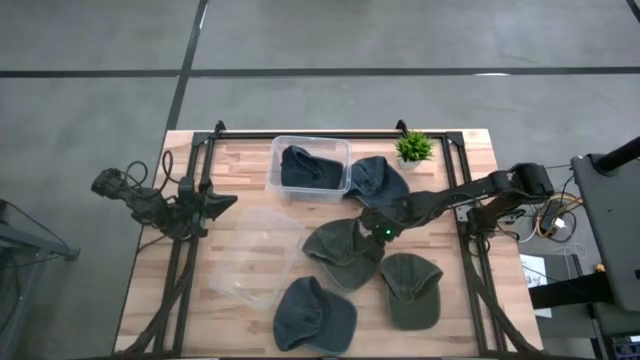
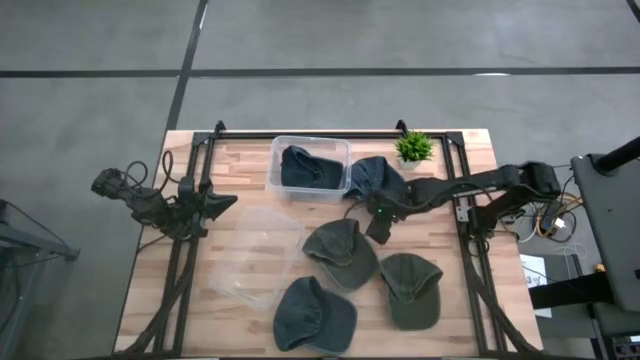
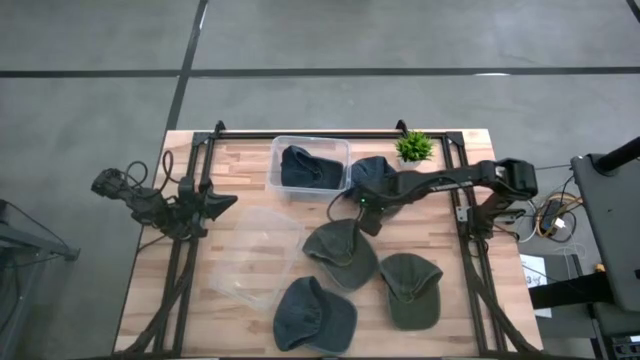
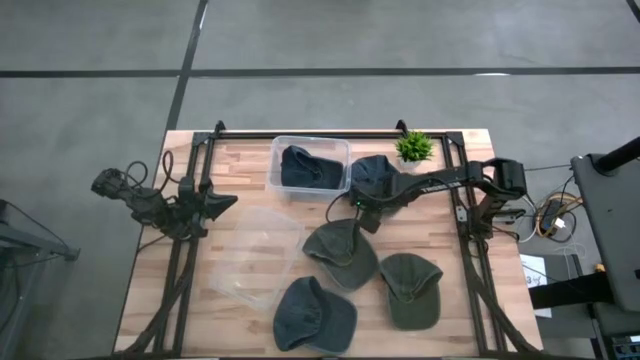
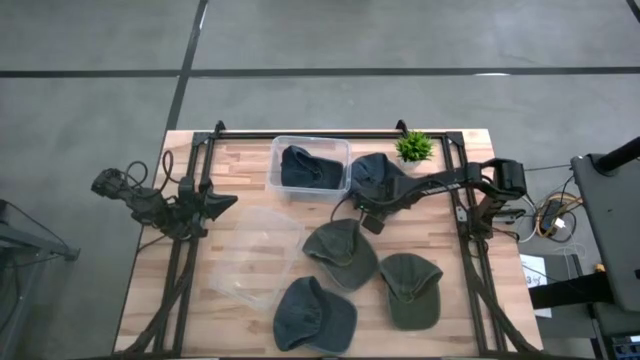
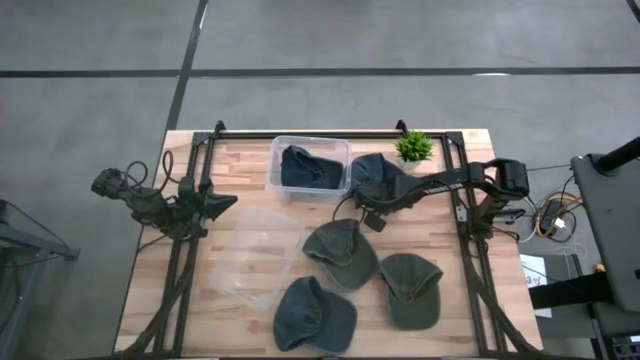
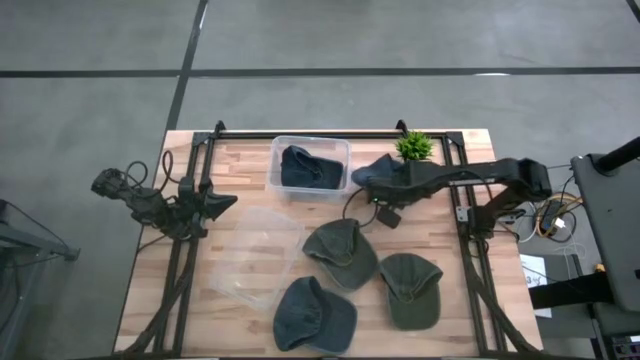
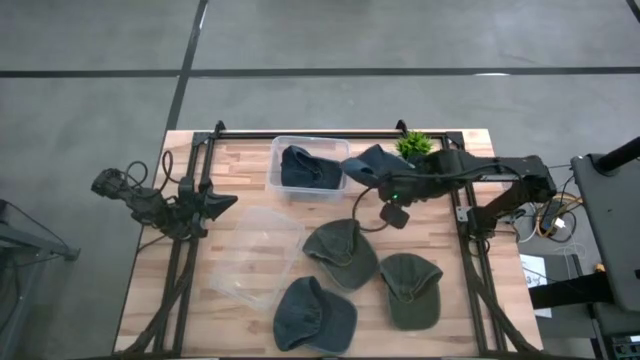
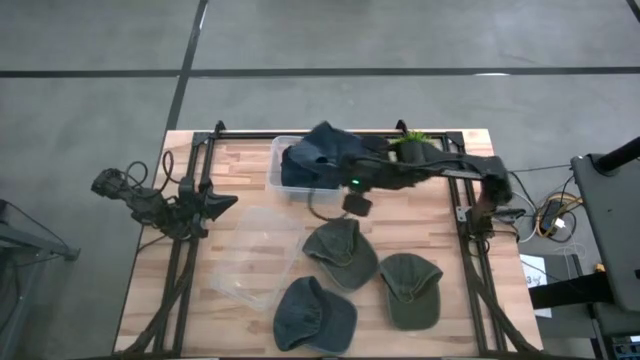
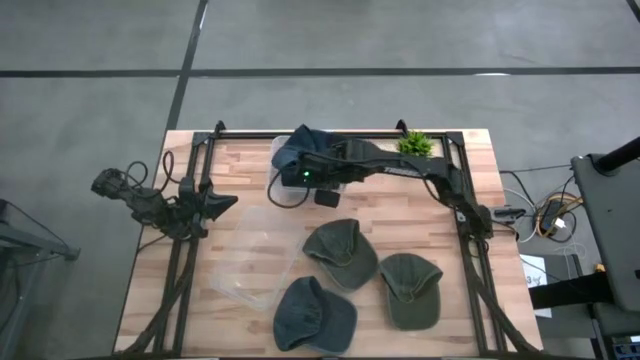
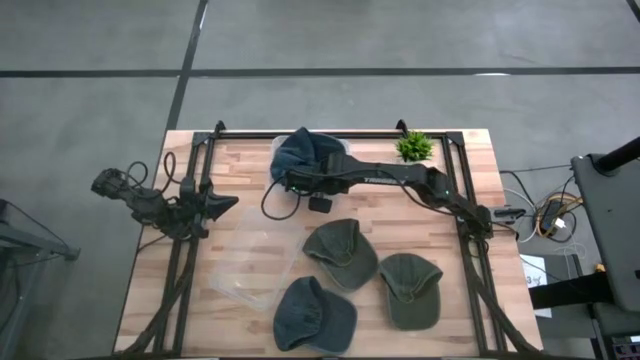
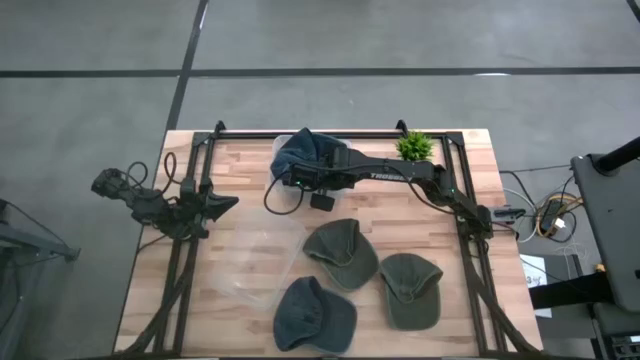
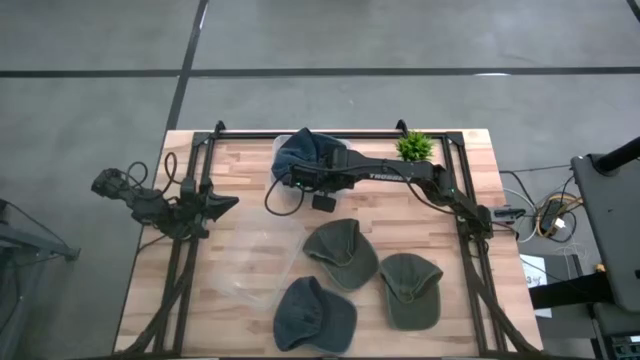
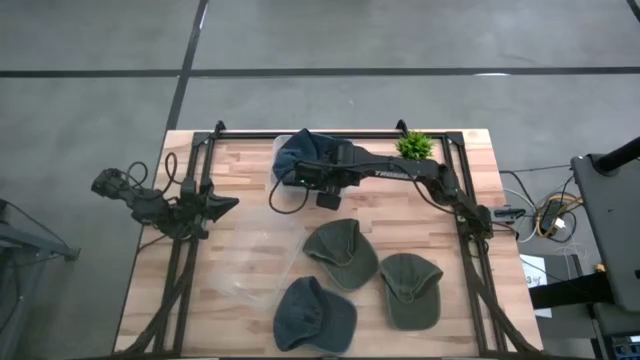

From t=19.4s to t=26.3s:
Task: Pick & Place hat
Put the top blue cap into the top transparent bin

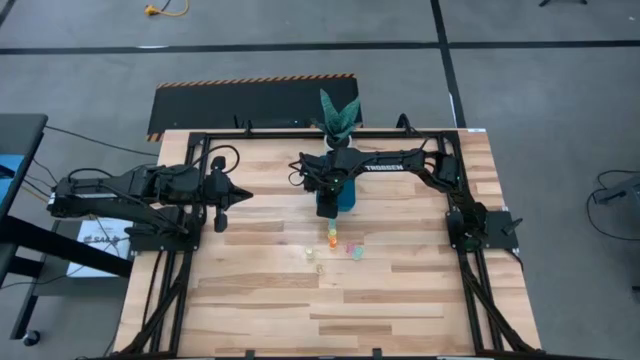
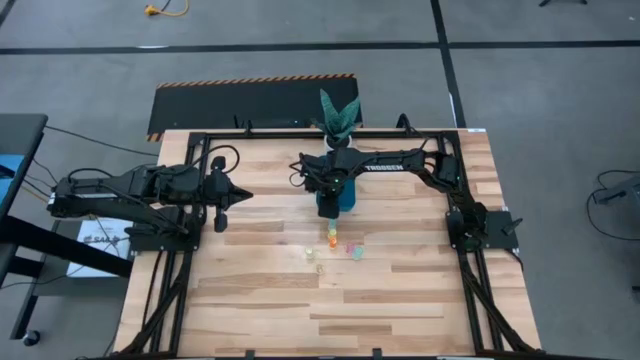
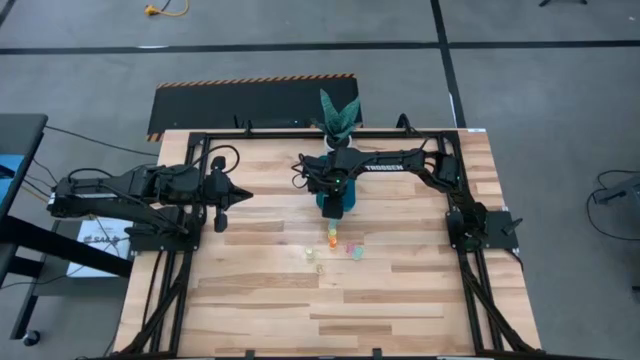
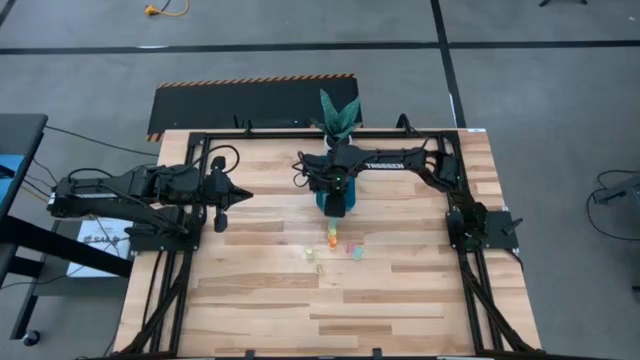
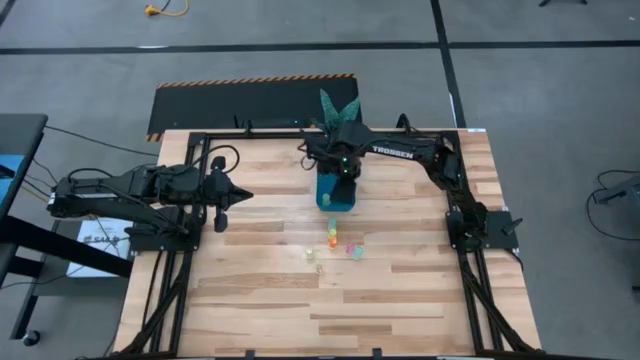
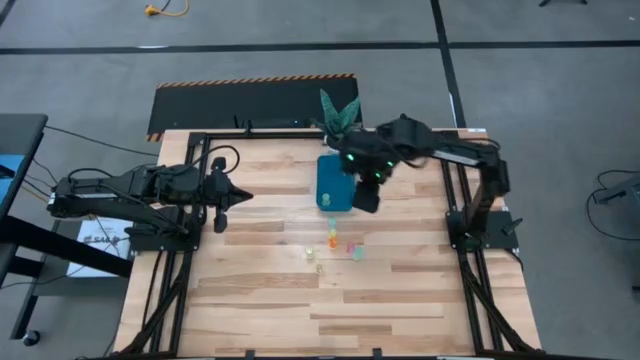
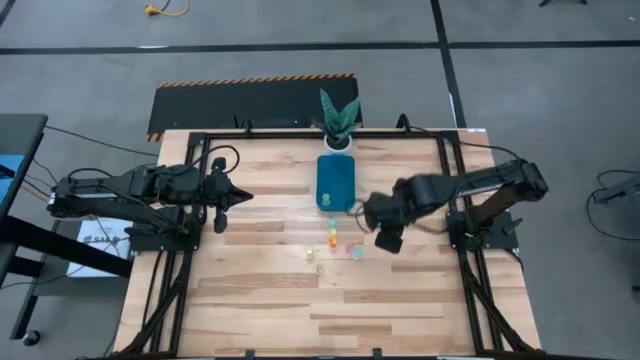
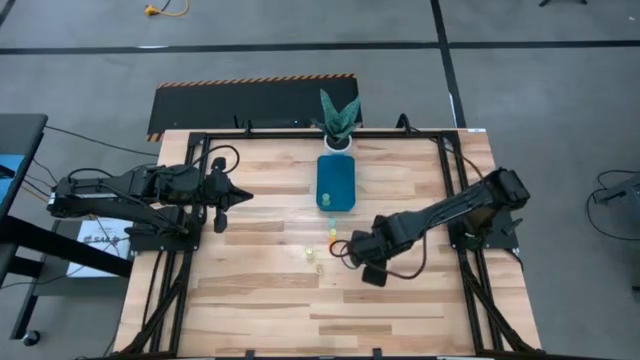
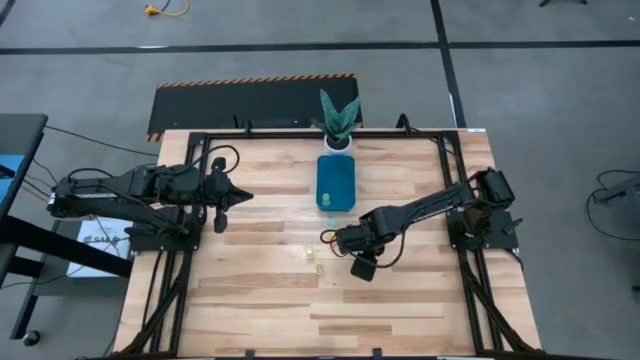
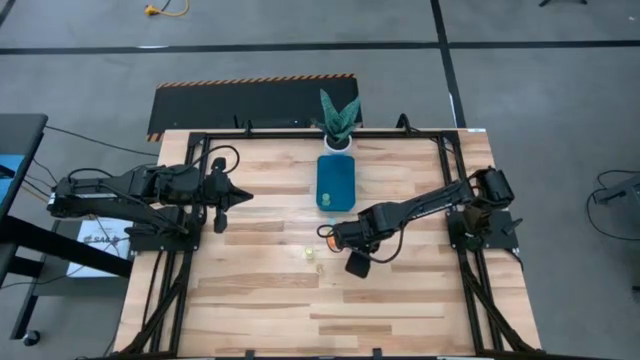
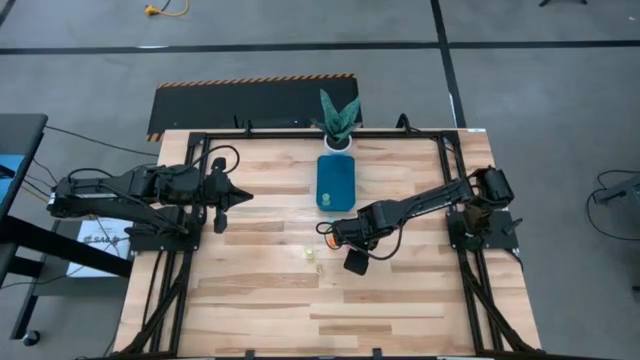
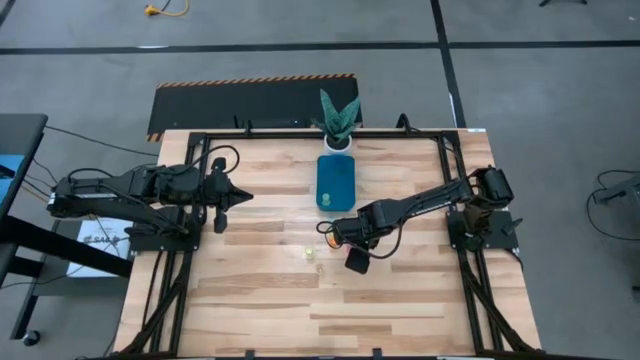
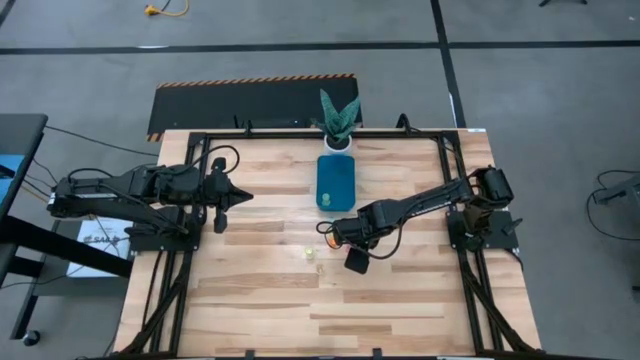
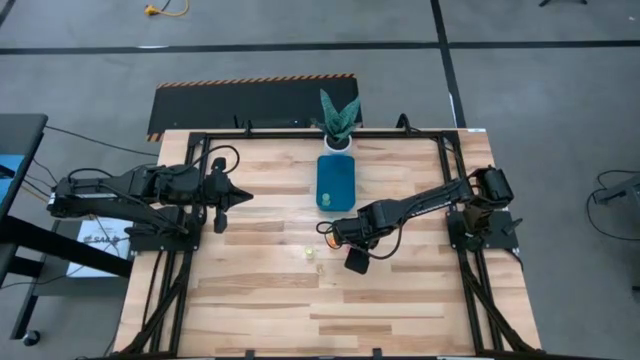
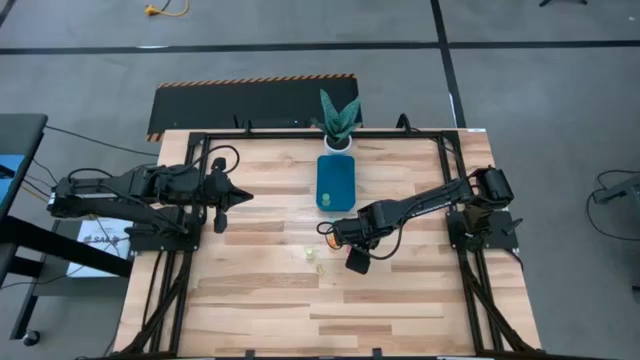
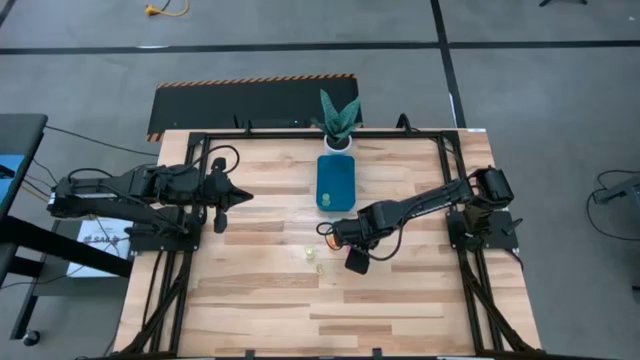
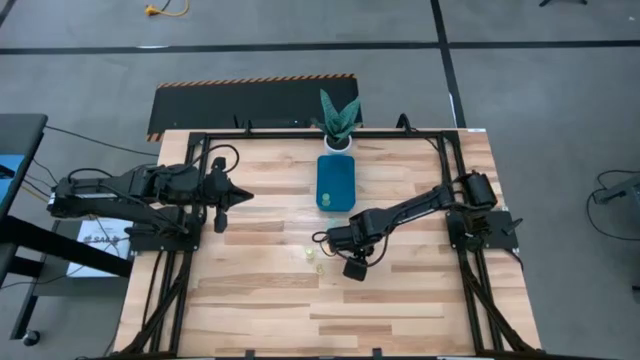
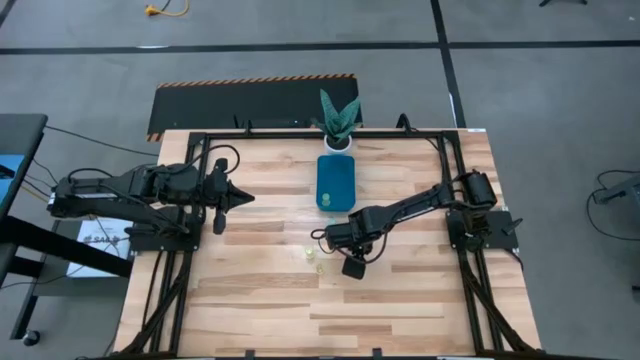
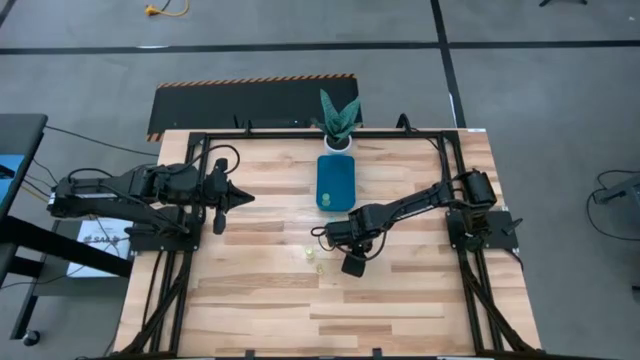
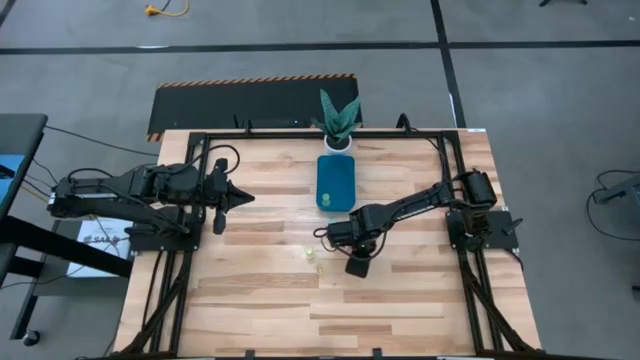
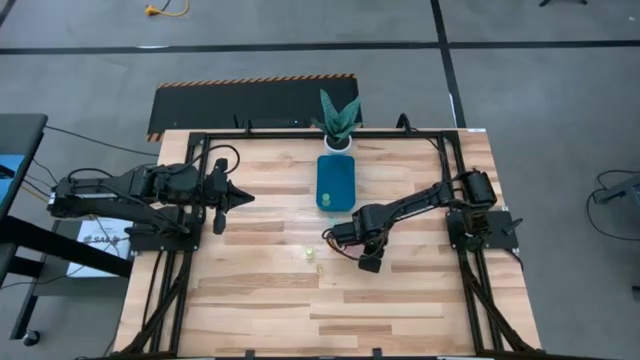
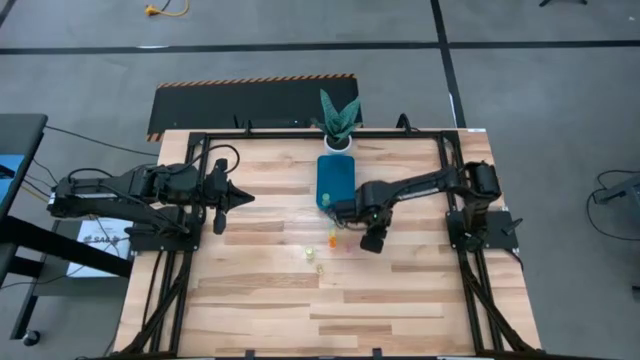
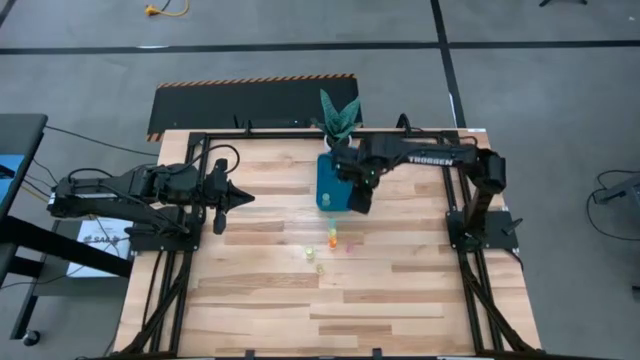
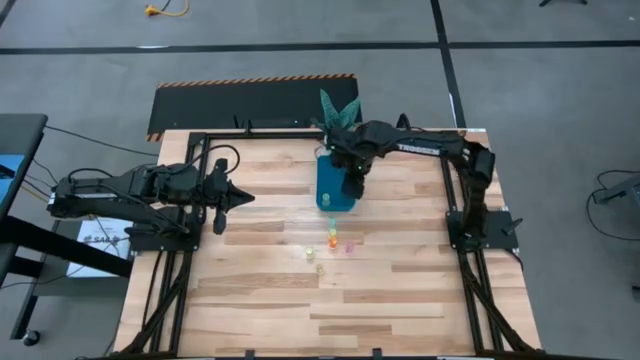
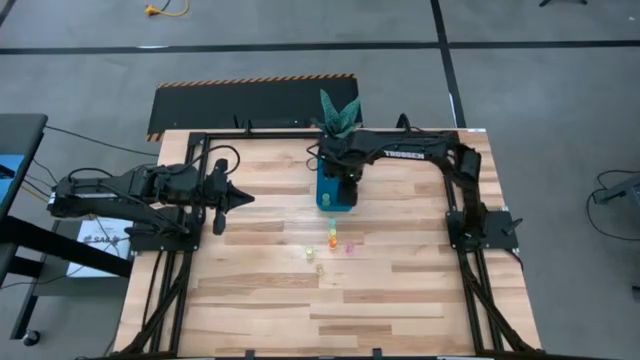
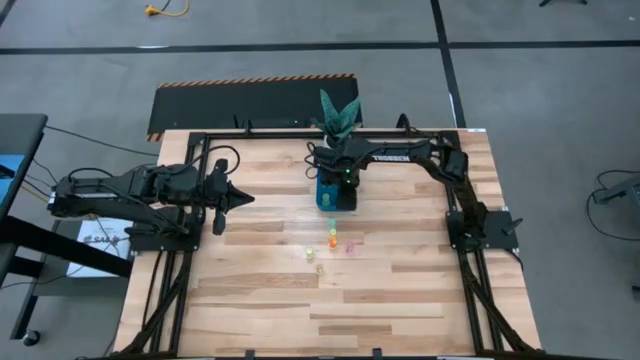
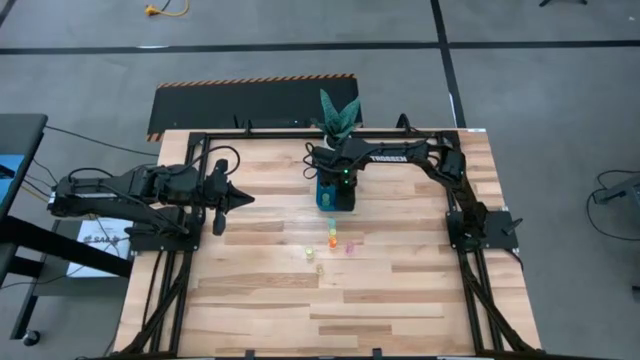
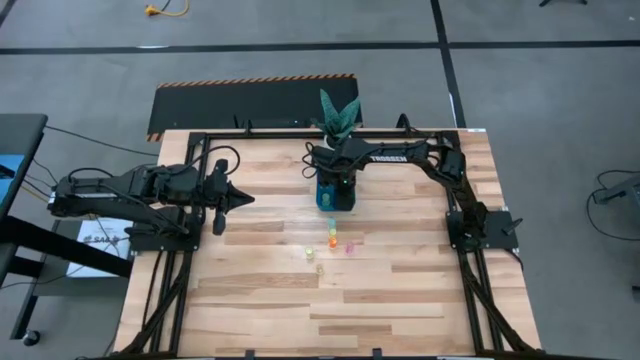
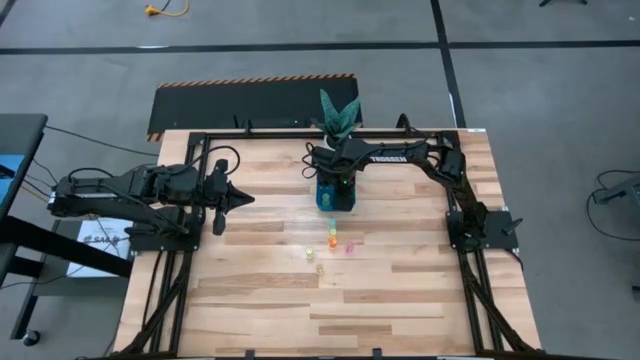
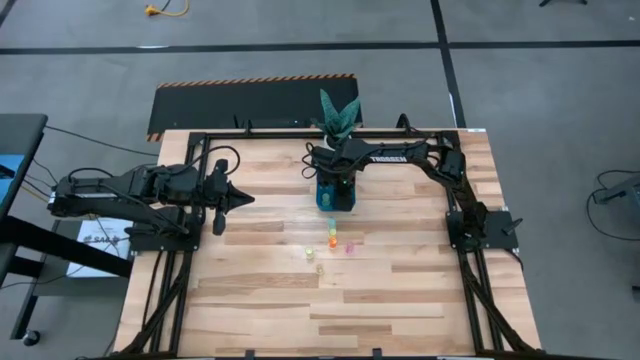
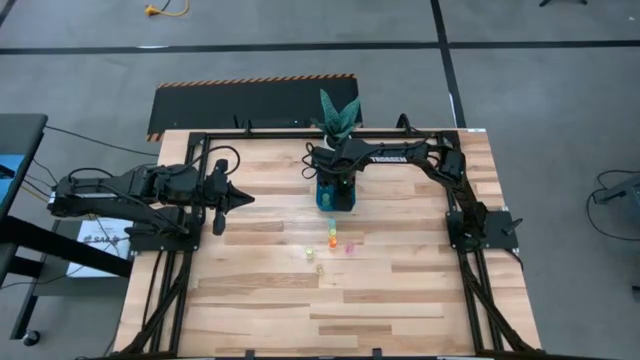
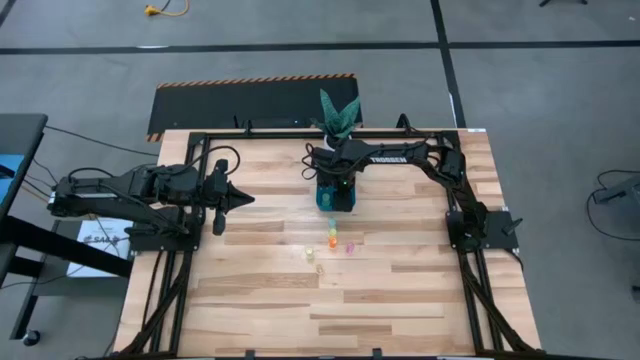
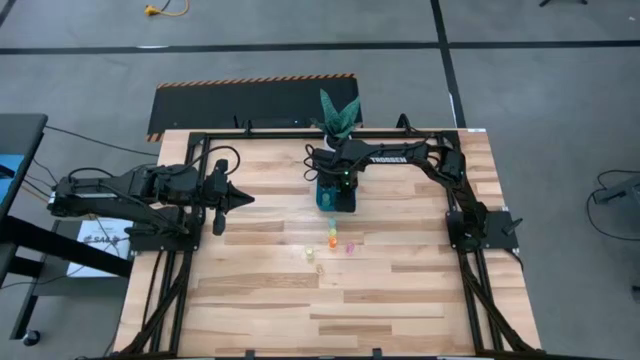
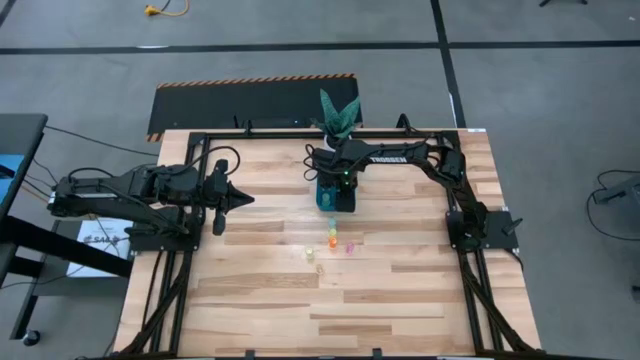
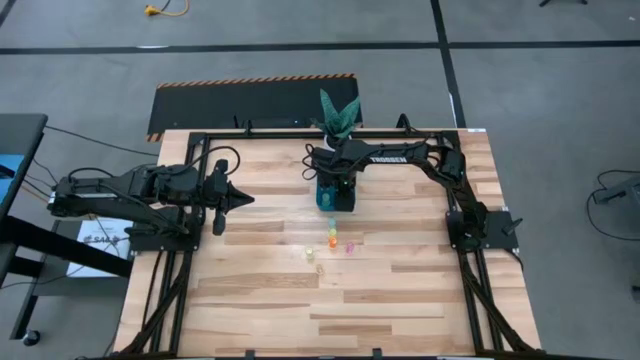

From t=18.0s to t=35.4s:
Task: Pick and place pill bottles into a basket
Put the blue pill bottle into the blue bin
